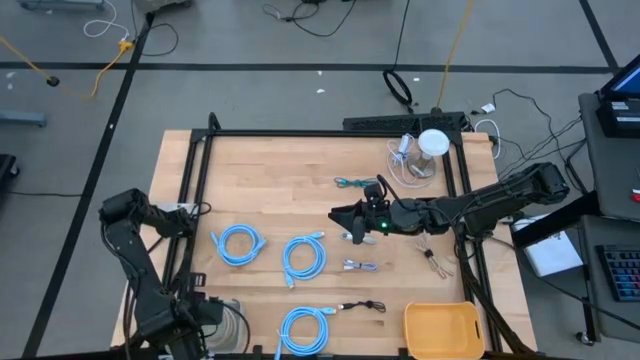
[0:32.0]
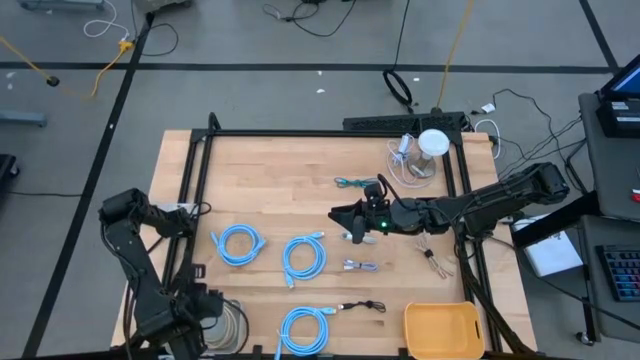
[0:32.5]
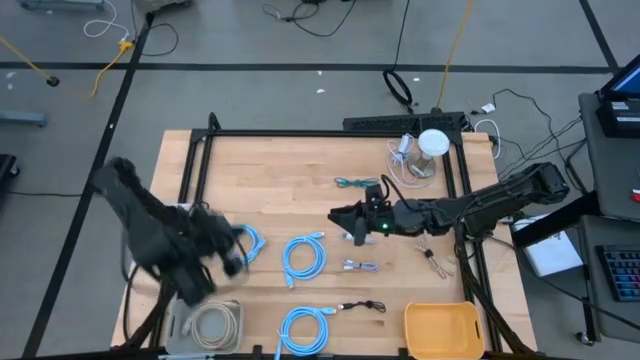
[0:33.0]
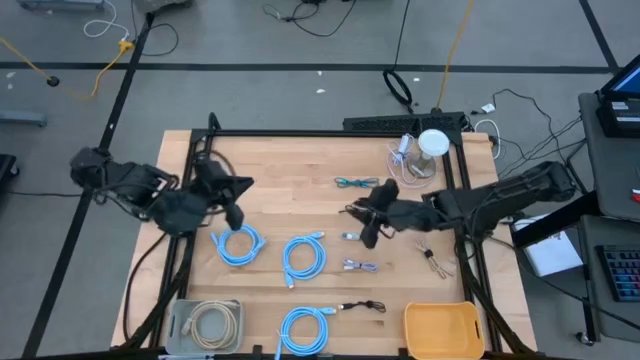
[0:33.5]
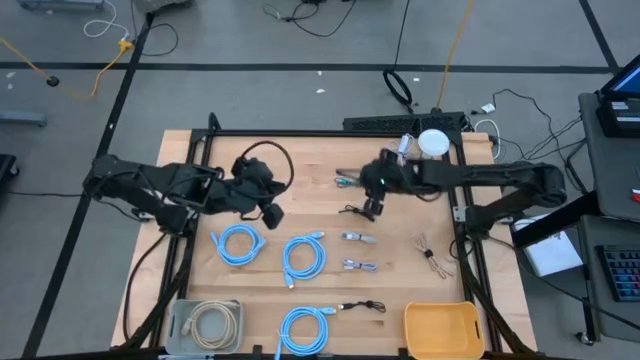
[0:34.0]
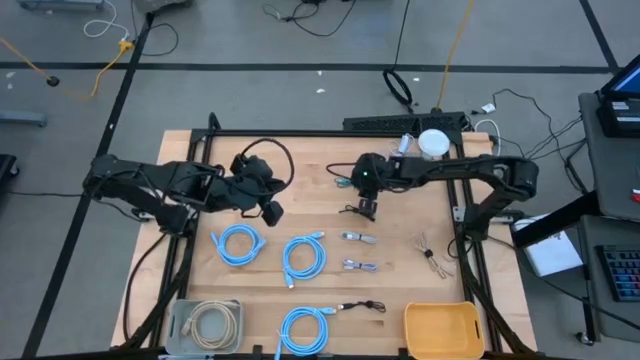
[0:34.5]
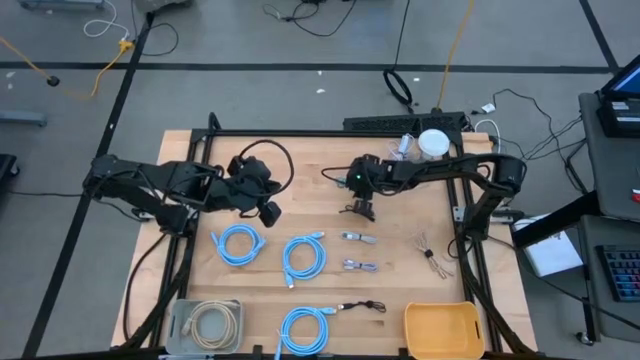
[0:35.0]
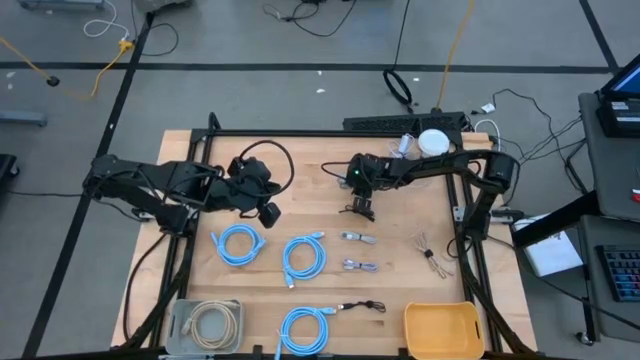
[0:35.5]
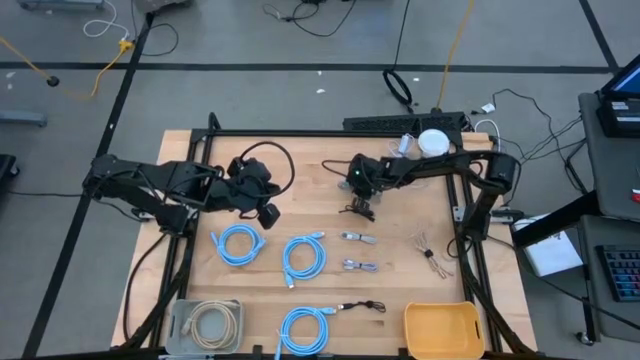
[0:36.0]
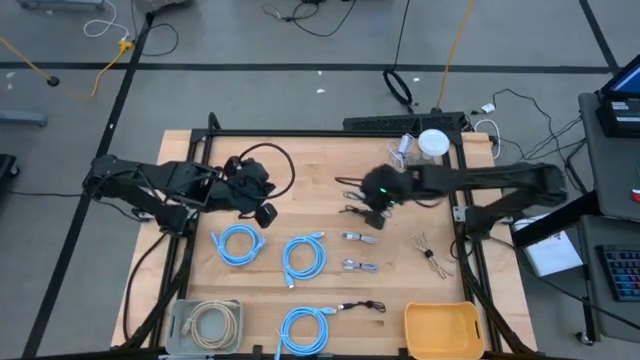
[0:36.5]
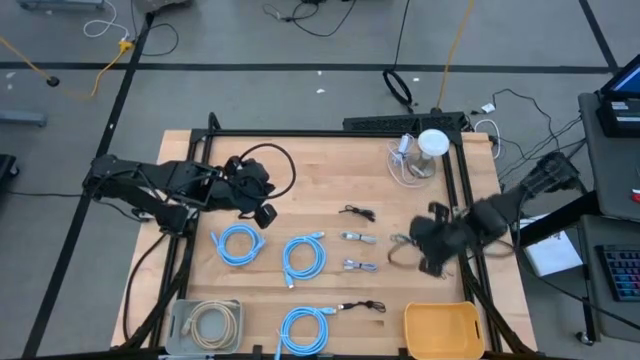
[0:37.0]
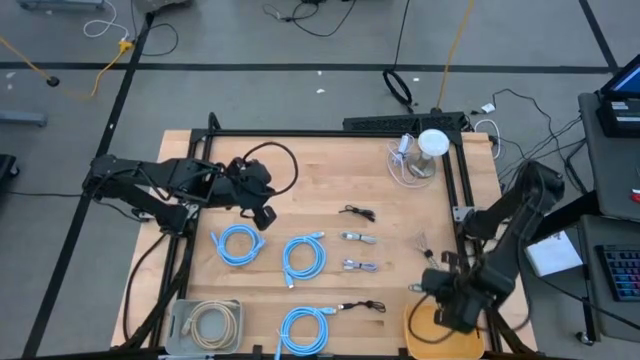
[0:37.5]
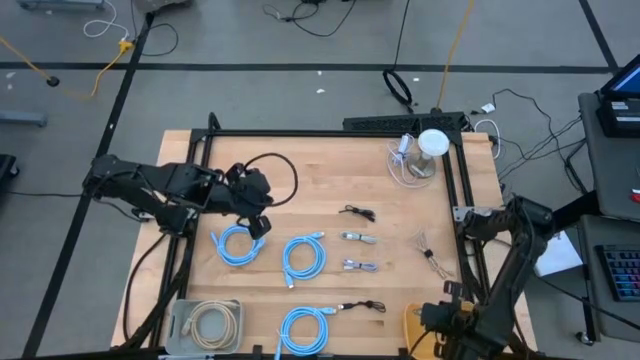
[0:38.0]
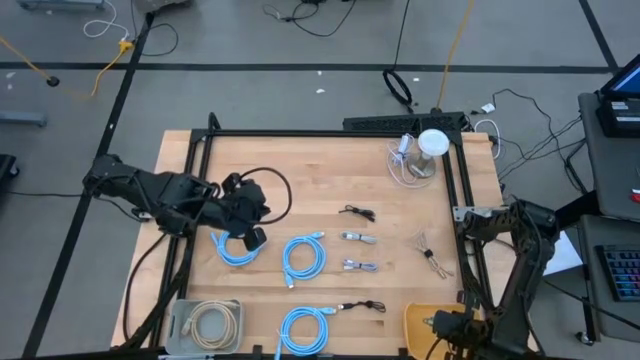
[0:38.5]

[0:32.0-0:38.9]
Task: Pick & Place USB Port
Put the blue patterned charger cable into the yellow bin

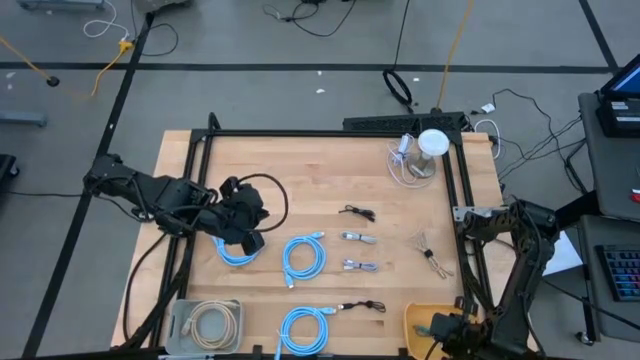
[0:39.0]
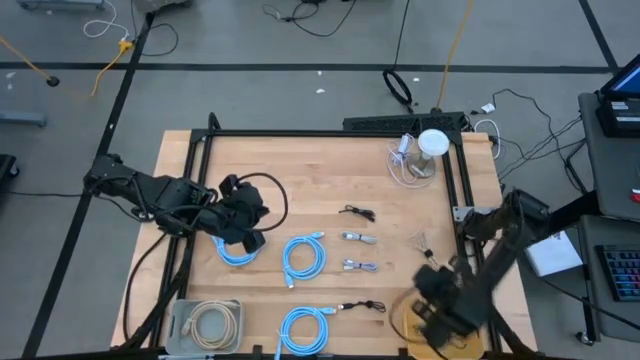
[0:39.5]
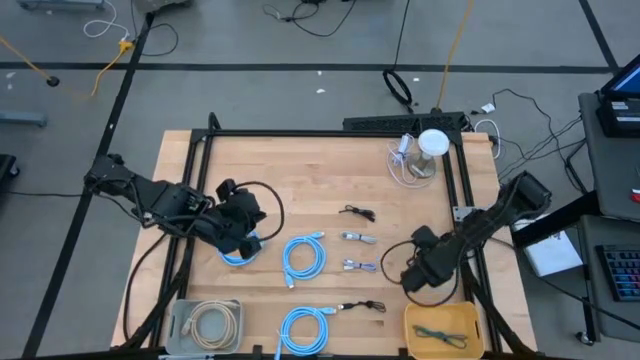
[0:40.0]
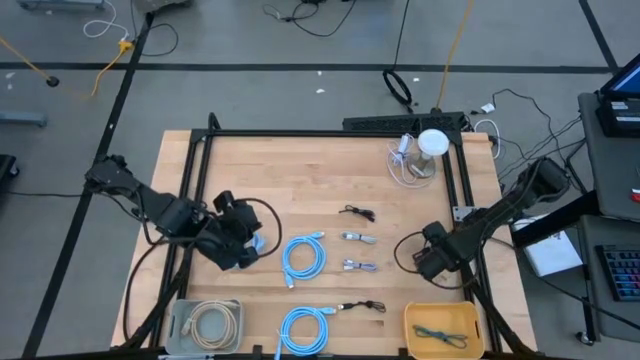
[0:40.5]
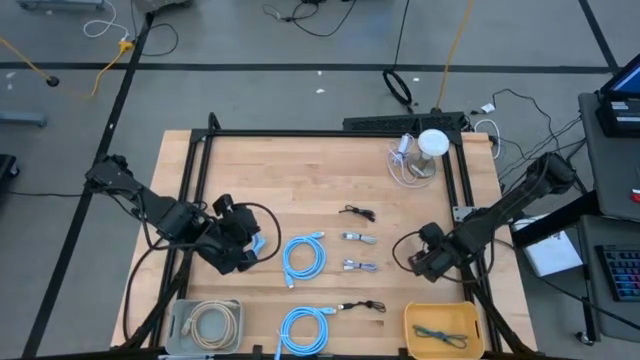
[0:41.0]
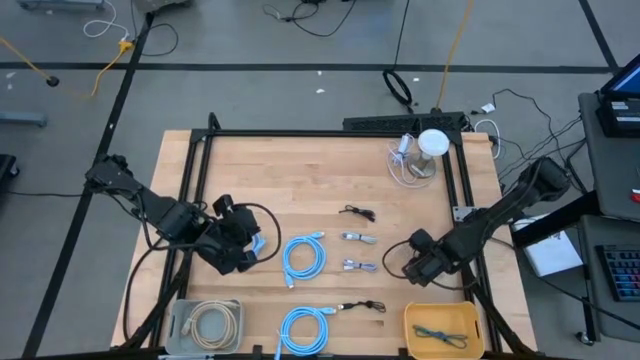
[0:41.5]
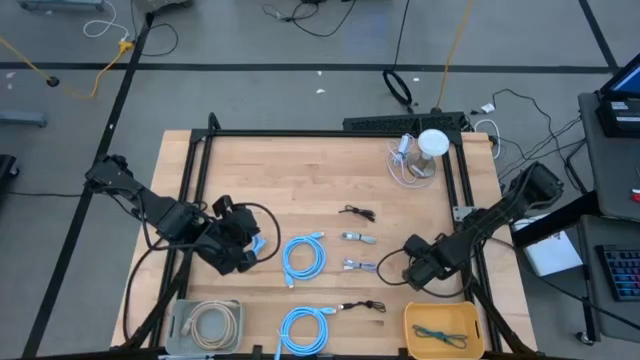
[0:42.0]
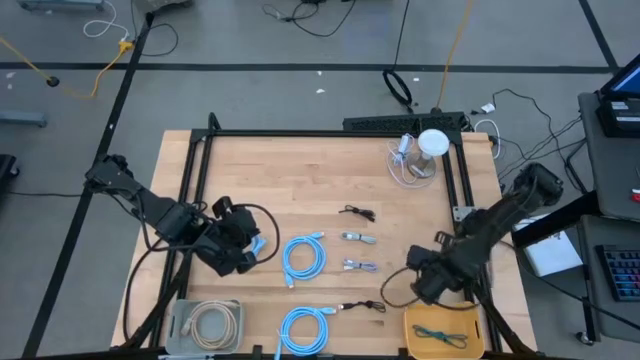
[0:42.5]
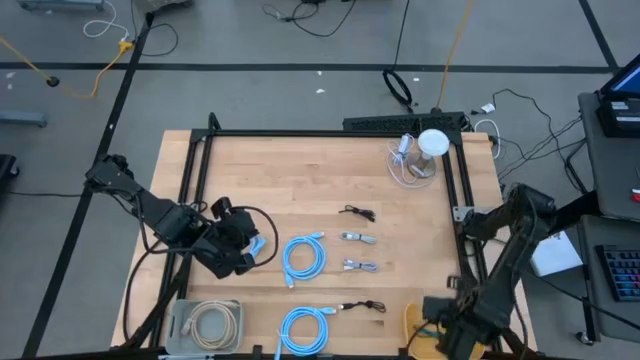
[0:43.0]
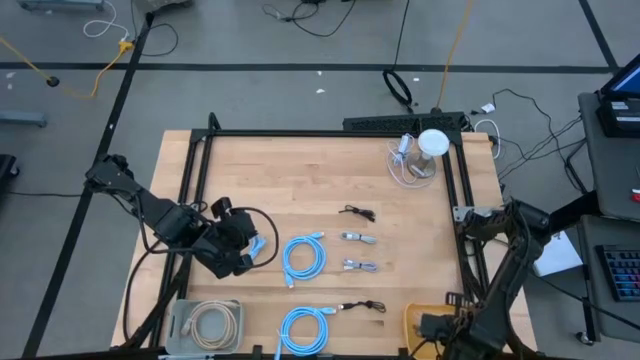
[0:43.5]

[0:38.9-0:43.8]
Put the brown patterned charger cable into the yellow bin

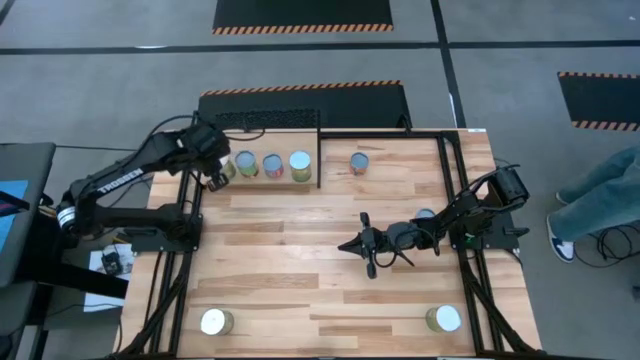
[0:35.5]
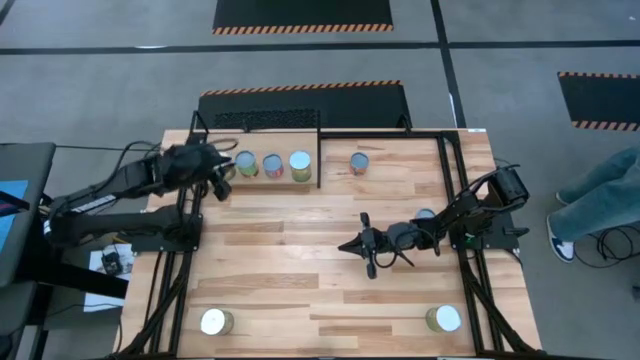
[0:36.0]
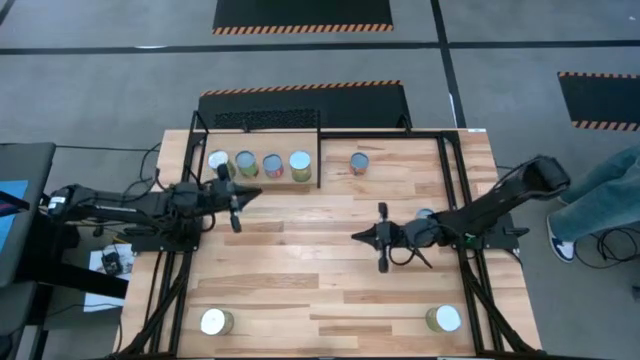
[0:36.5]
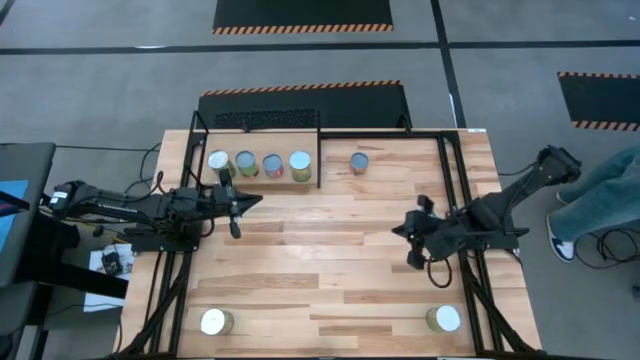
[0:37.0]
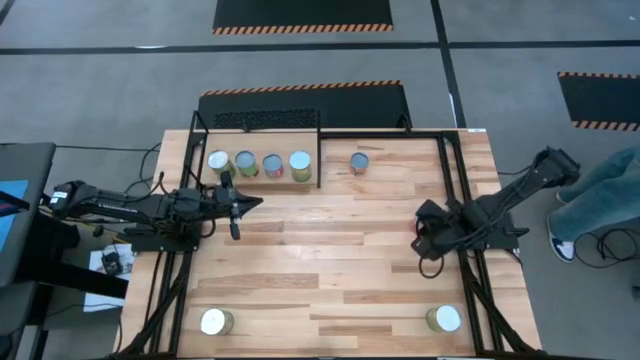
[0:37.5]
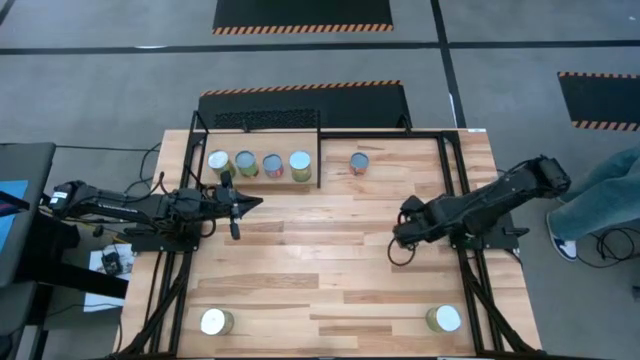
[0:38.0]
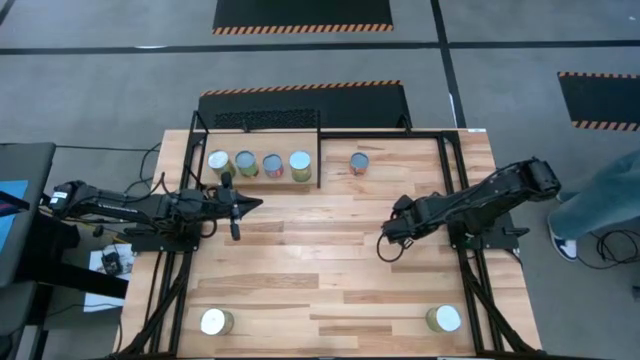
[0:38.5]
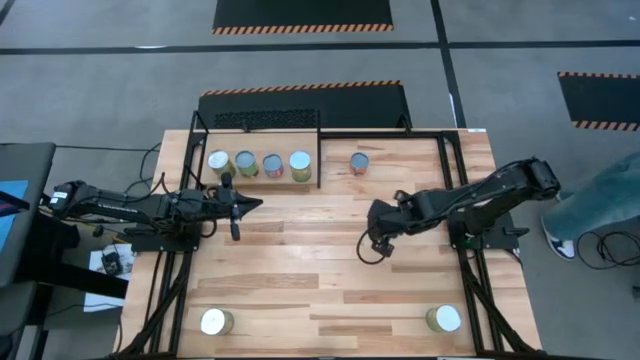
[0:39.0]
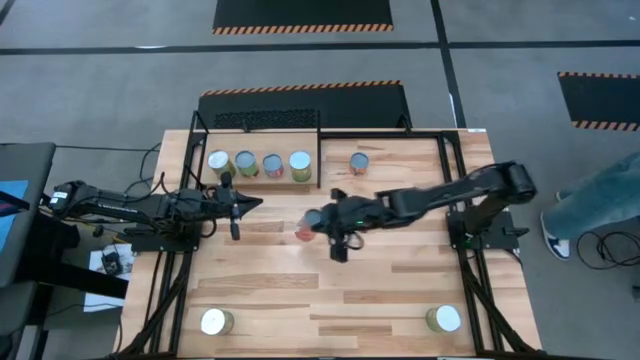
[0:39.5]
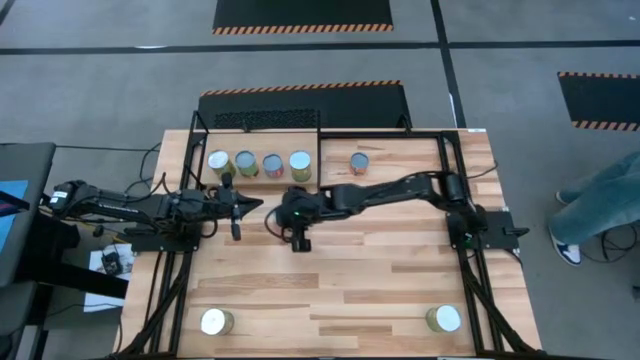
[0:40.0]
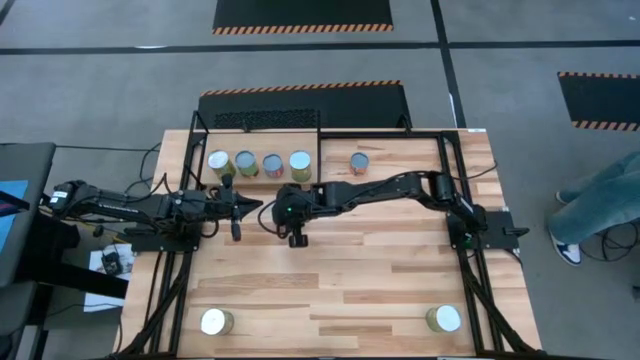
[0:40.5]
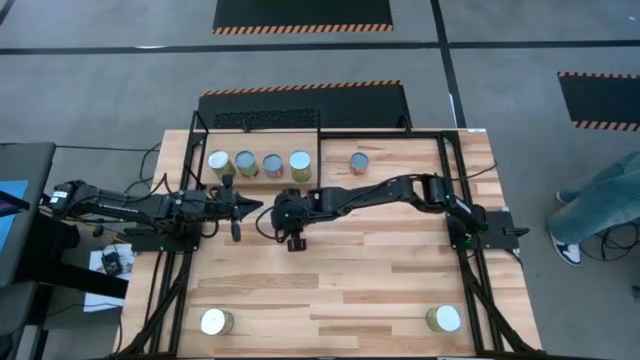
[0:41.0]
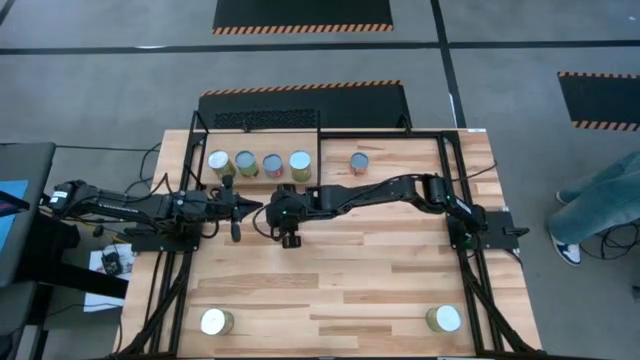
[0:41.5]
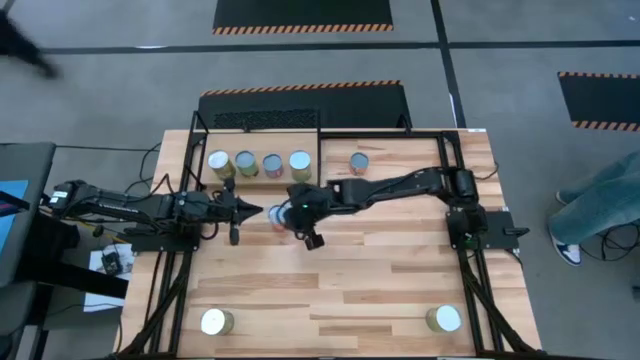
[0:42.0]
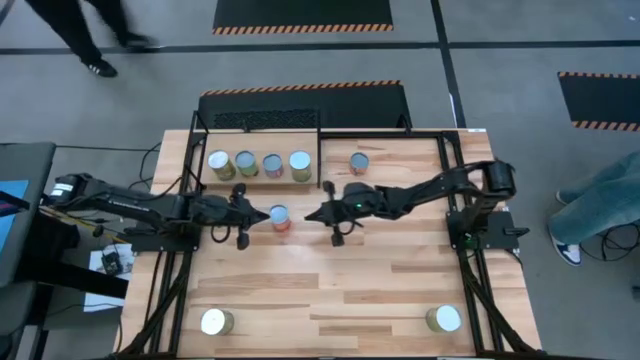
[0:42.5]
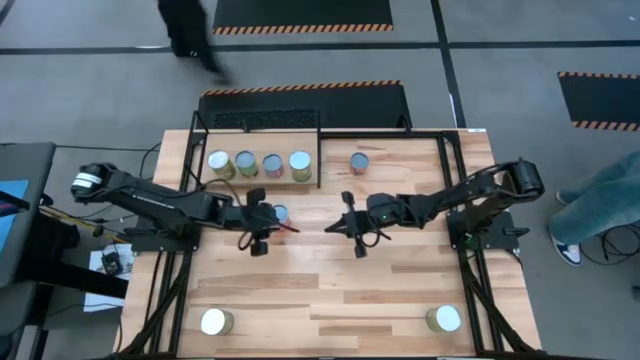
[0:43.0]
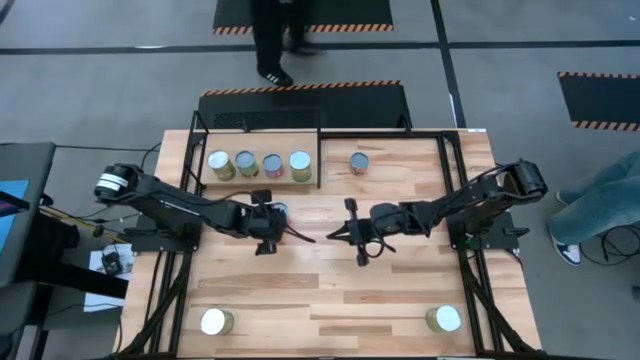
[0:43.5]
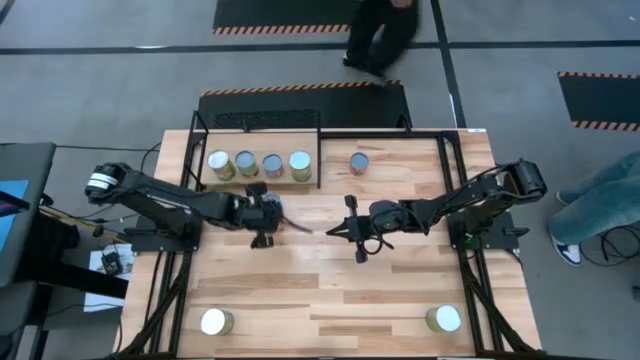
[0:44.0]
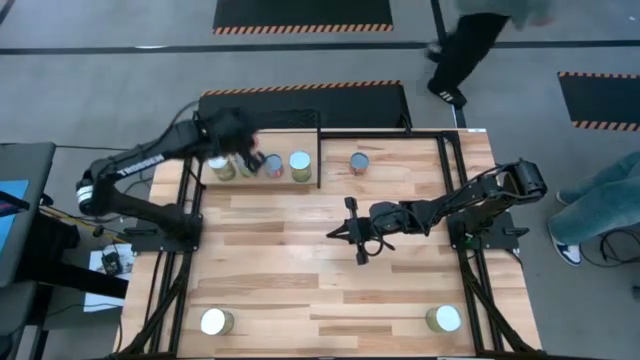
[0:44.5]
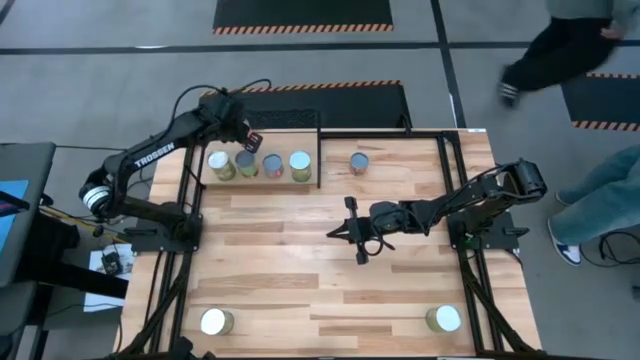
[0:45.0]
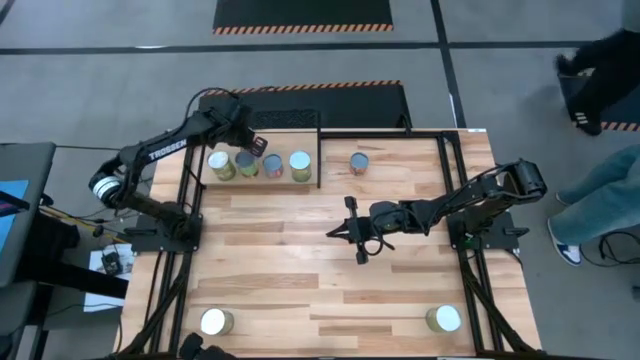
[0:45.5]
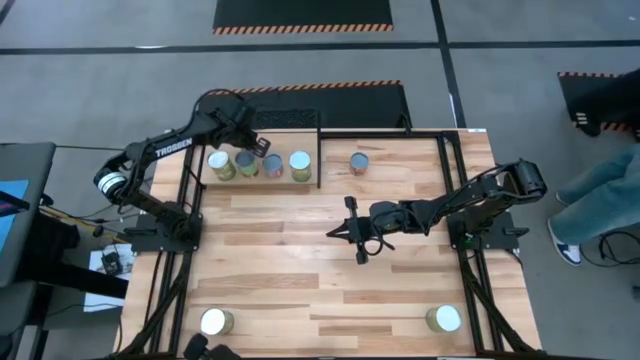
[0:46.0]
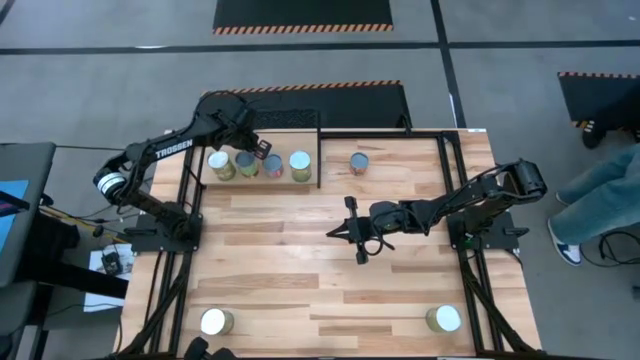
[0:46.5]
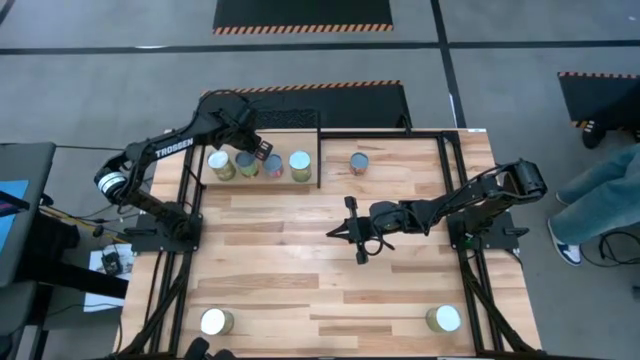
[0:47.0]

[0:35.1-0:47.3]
Task: Pick and place cans onto a shelf
Put the canned mixed fruits on the shelf
